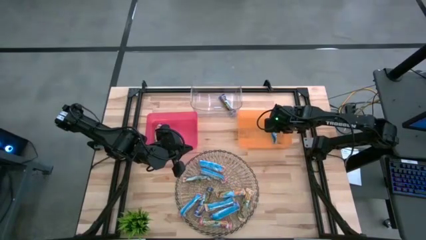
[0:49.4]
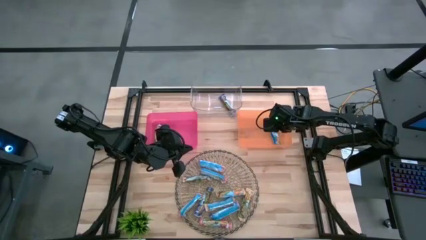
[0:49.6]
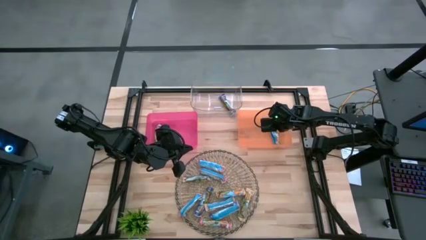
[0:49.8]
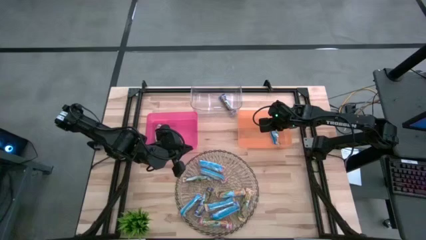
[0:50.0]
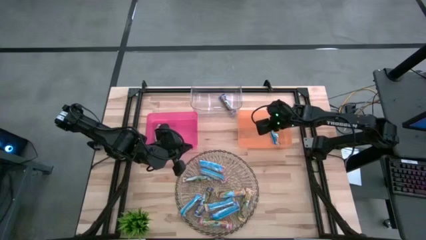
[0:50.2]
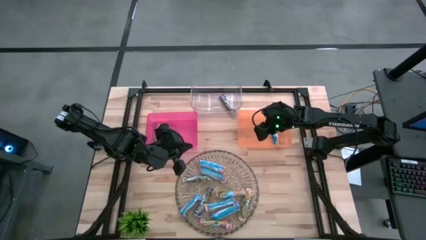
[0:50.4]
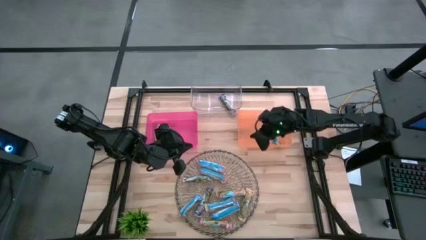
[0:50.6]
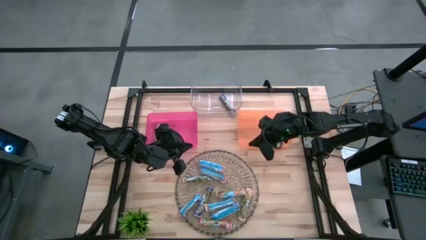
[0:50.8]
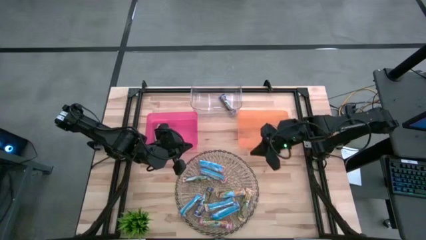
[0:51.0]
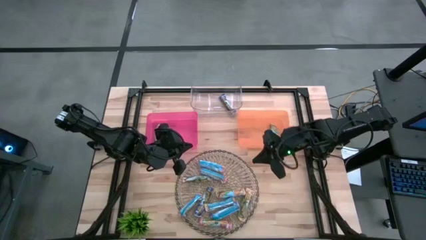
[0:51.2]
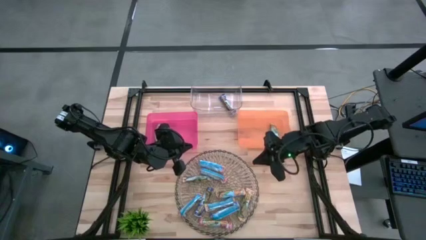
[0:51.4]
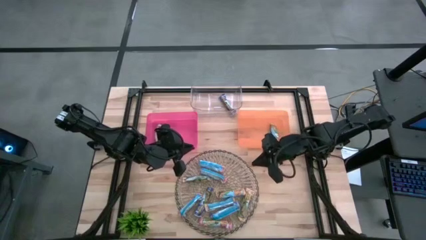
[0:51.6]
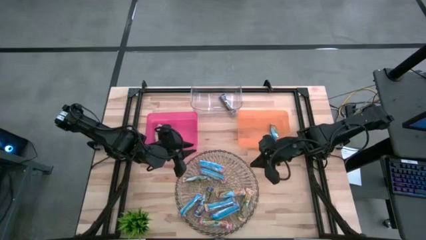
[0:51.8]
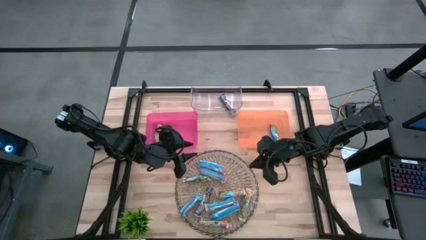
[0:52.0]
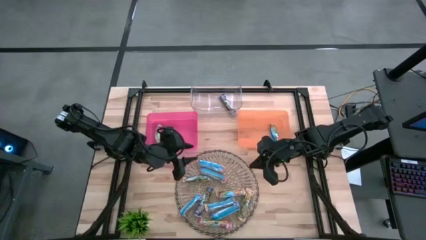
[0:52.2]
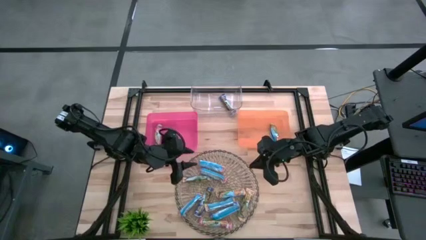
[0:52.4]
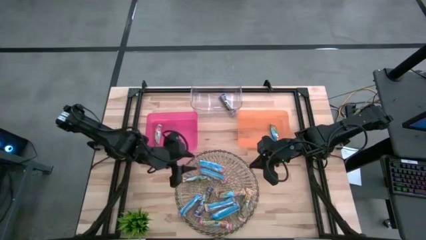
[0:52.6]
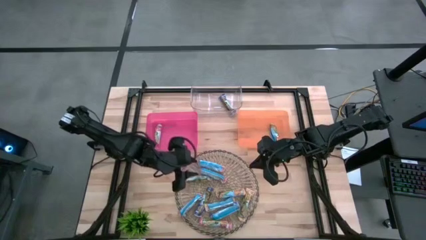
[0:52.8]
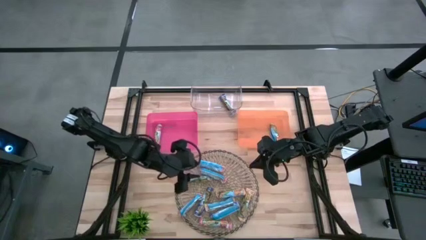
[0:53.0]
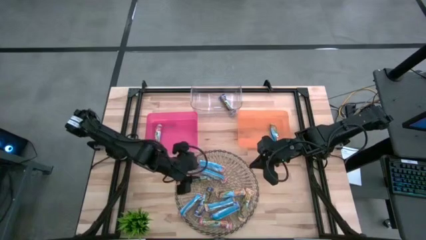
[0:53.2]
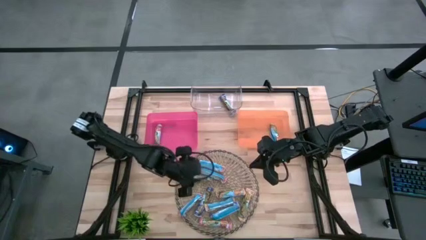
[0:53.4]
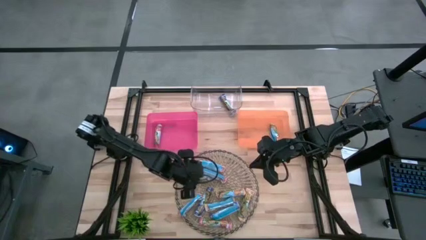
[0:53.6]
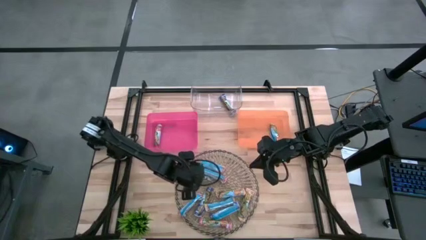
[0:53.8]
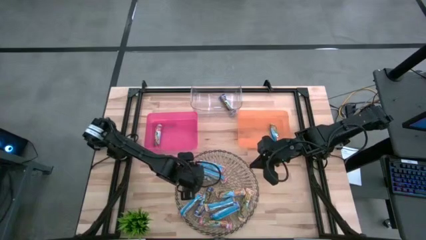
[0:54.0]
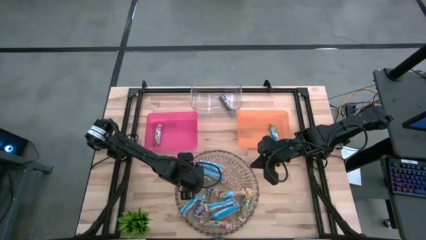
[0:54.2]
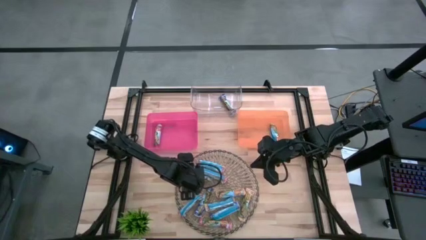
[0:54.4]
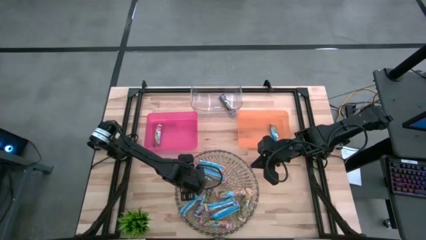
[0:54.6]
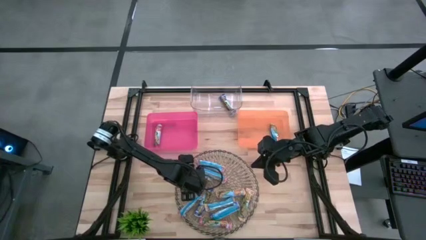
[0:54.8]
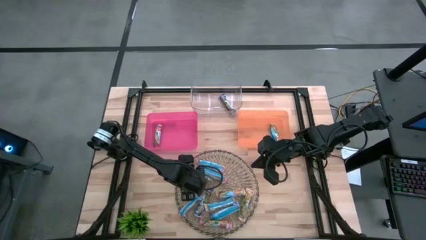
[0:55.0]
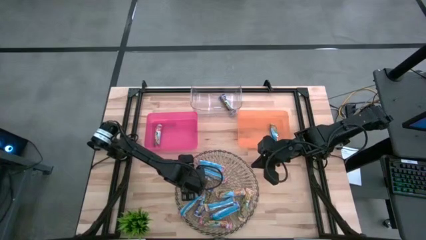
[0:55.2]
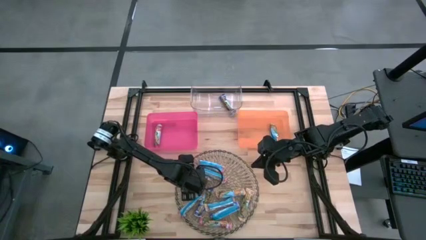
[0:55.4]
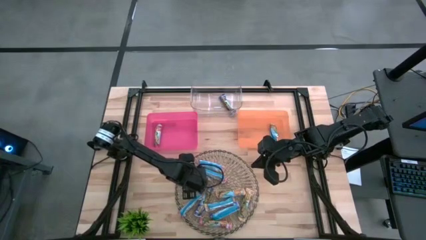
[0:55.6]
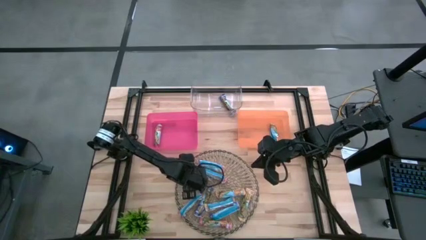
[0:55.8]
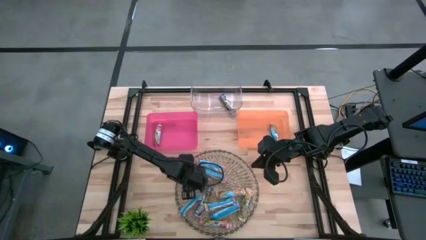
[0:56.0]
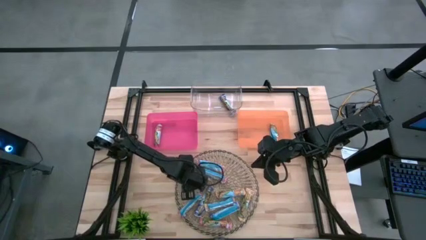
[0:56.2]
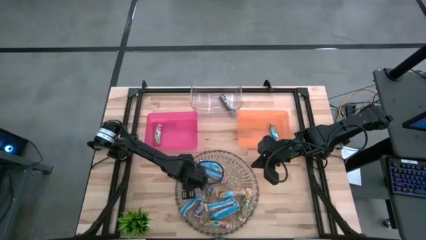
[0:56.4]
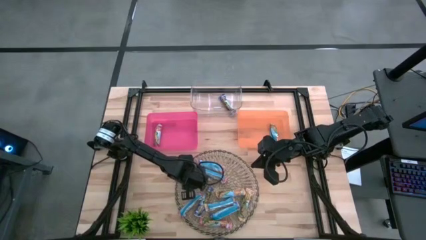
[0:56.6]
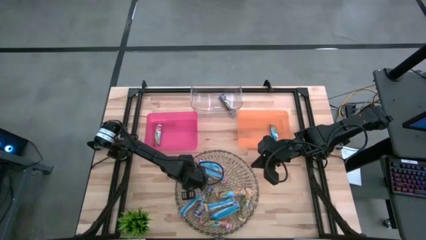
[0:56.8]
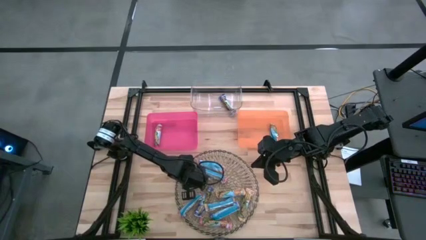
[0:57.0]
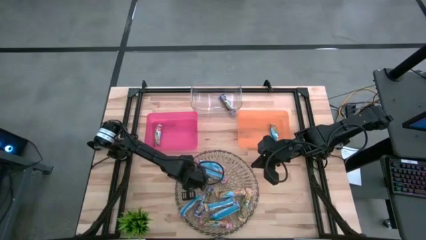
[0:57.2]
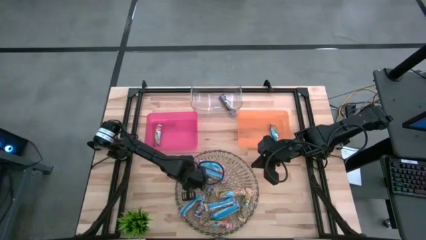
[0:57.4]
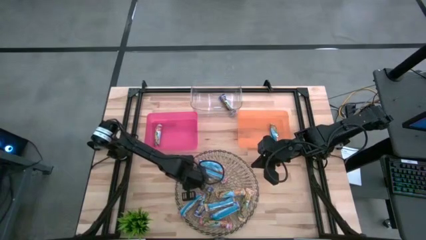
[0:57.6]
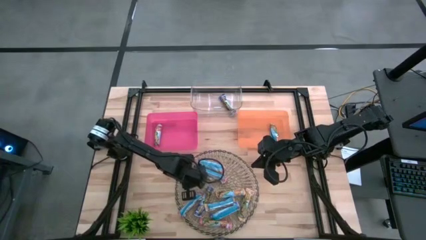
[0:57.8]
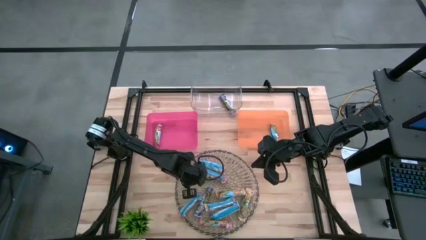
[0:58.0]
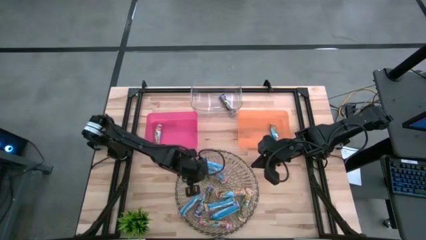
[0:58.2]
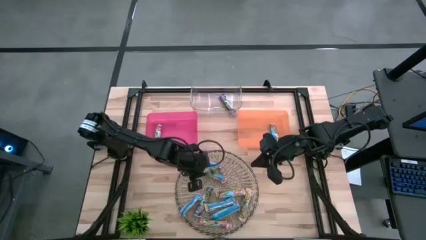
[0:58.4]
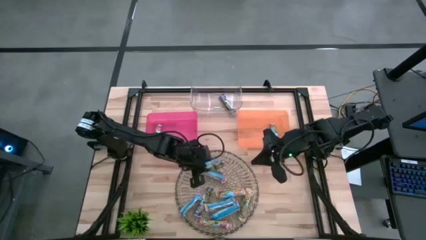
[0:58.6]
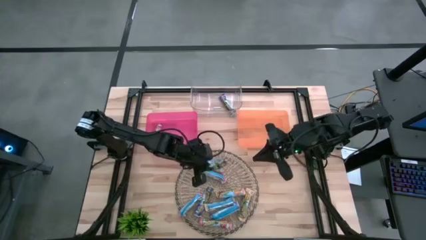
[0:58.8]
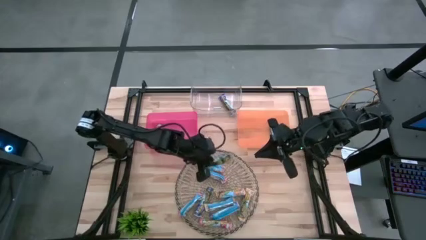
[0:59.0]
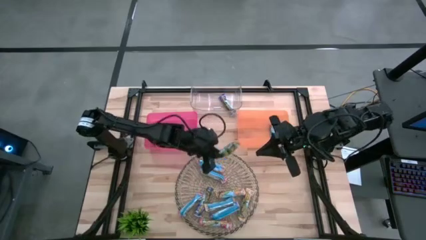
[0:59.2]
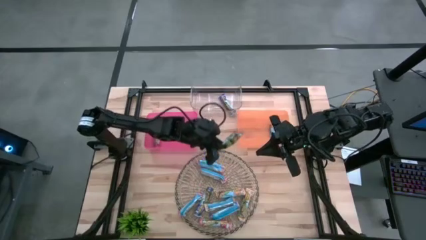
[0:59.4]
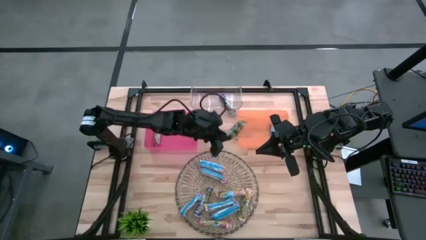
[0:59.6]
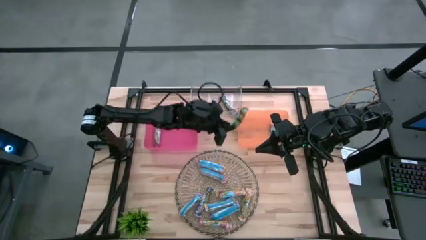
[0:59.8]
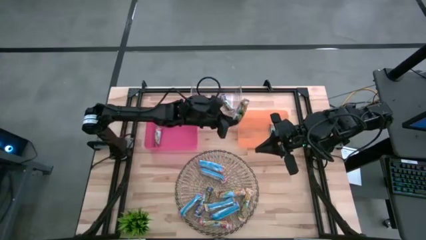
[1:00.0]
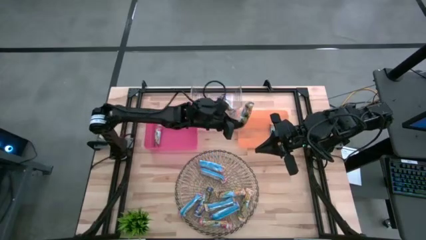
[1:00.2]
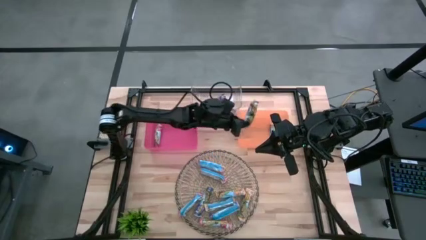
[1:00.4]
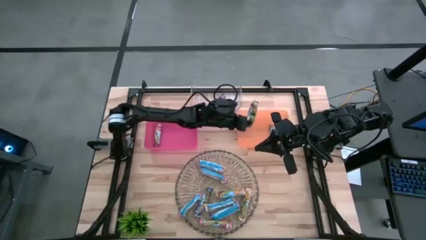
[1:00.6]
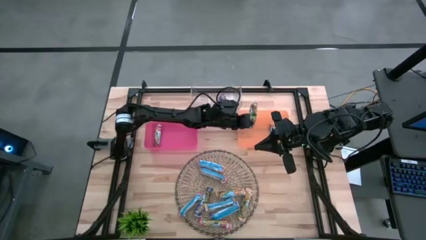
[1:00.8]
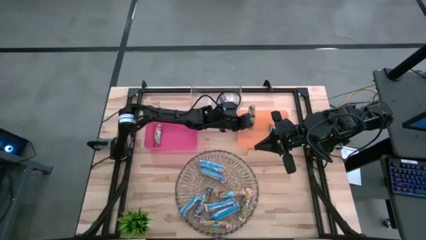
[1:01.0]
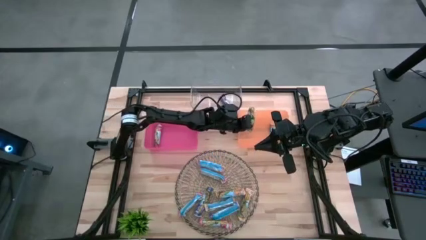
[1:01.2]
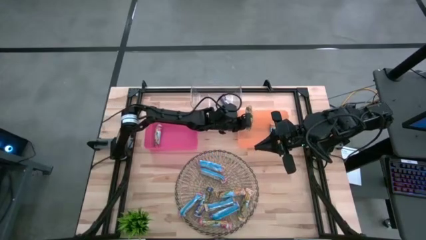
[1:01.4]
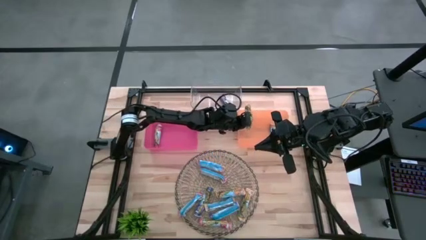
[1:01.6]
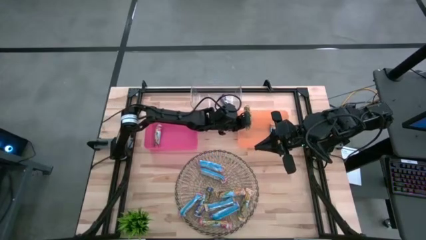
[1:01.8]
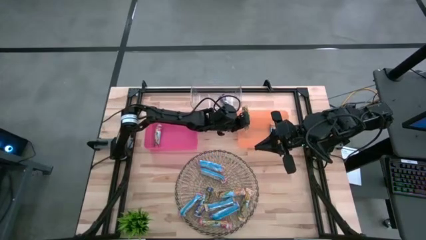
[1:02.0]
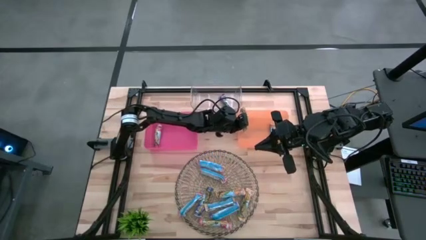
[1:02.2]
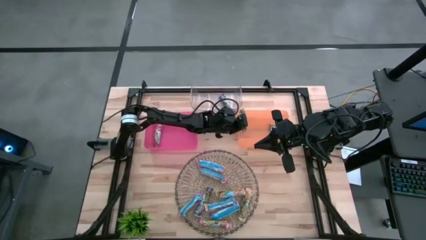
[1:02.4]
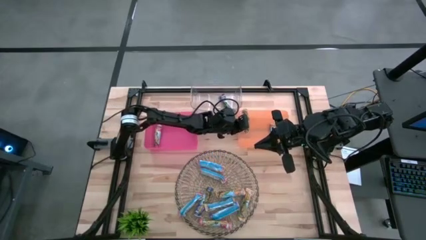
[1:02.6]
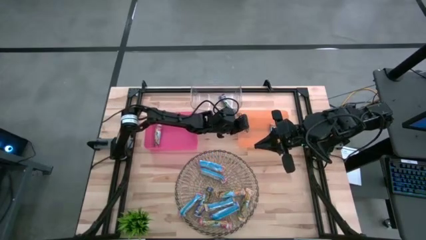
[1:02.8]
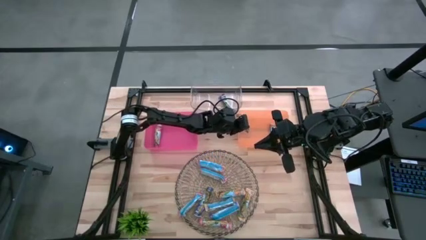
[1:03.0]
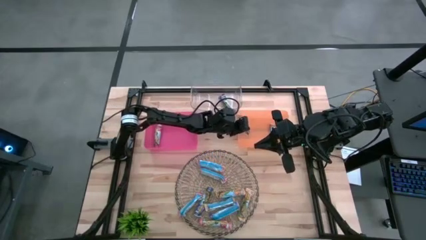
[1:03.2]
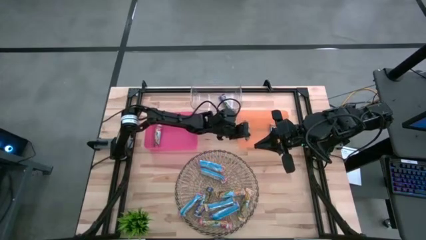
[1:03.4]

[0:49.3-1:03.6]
Task: Pick and place Granola Bars by type
Put the yellow granola bar into the yellow bin

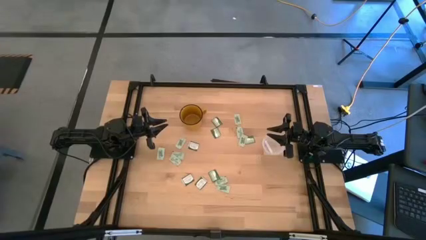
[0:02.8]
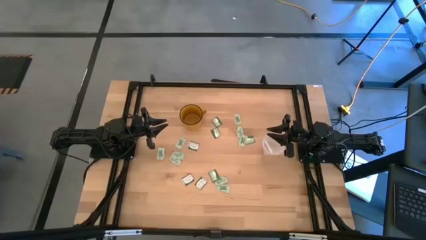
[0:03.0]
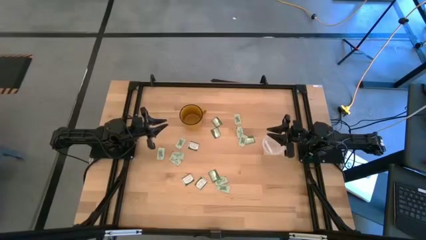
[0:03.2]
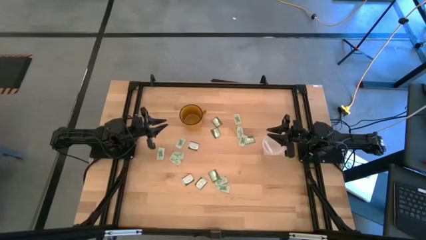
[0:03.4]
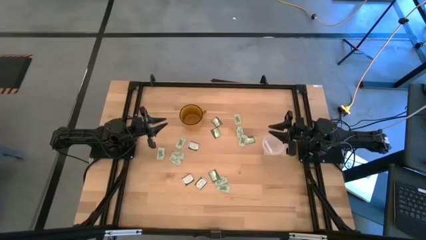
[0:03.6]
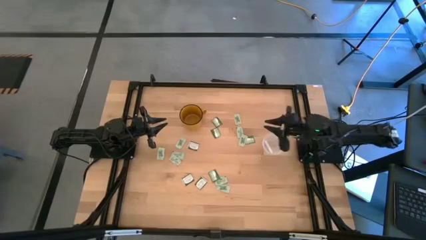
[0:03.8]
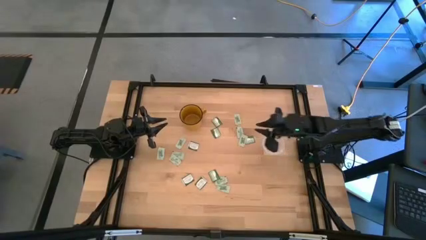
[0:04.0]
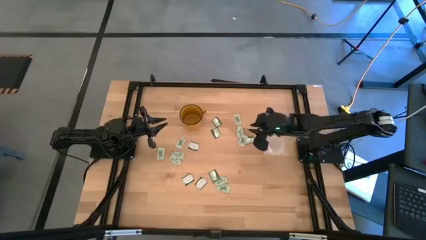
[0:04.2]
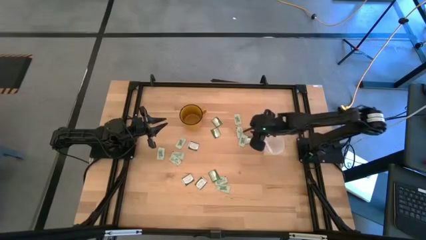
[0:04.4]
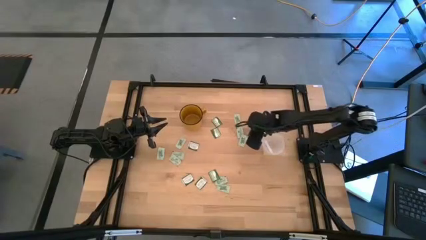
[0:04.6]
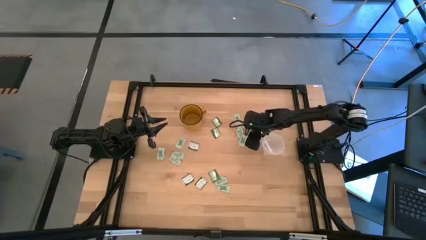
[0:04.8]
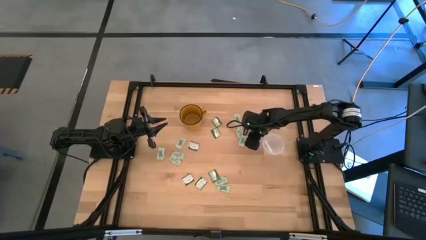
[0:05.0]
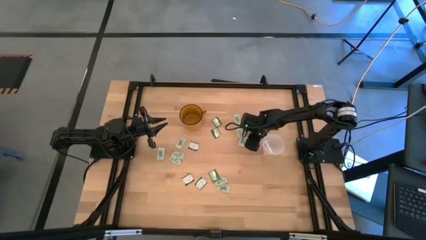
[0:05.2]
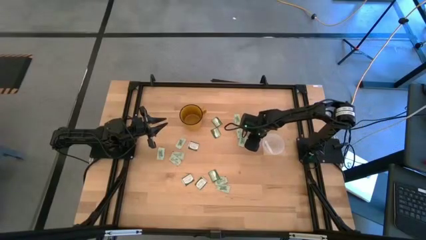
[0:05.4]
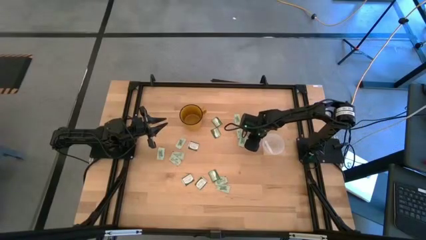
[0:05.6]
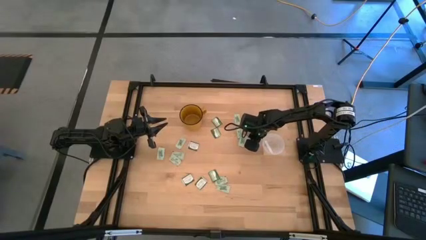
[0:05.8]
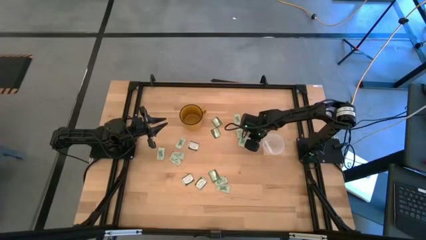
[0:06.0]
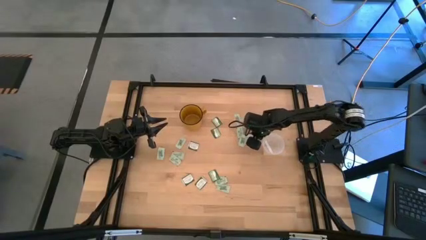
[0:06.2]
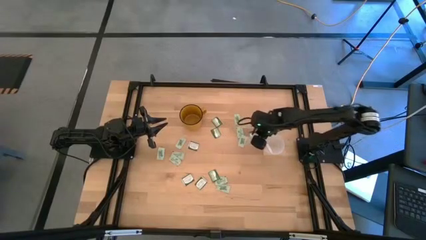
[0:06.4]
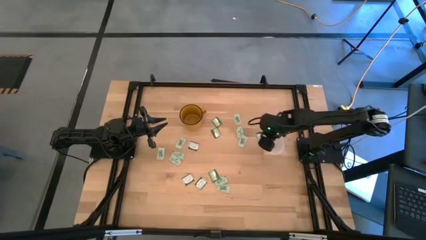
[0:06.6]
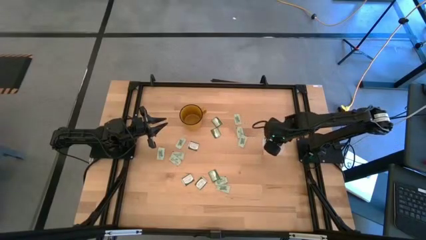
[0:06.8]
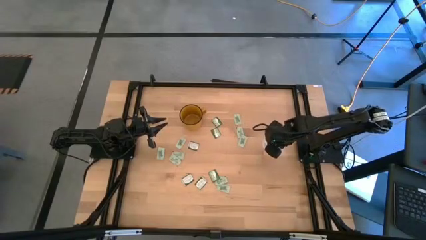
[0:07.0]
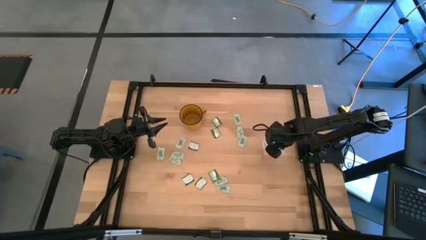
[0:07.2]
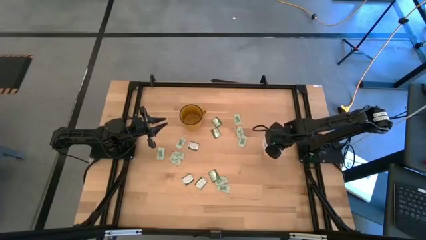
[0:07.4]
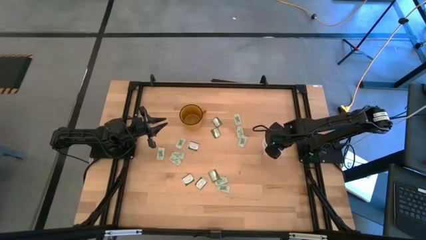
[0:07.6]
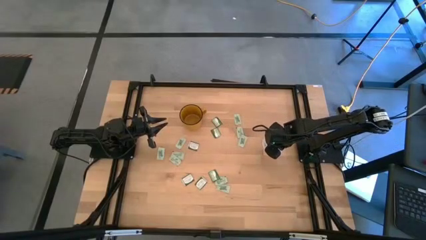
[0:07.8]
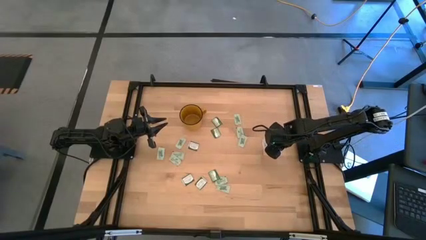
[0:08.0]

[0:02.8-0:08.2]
Task: Pick and place items into bin
Put the truvia packet into the transparent bin
